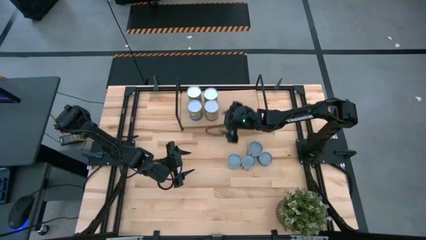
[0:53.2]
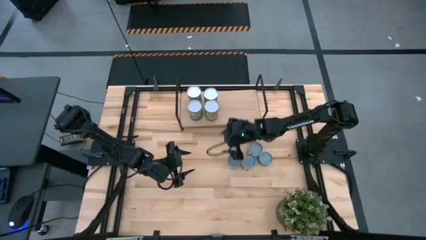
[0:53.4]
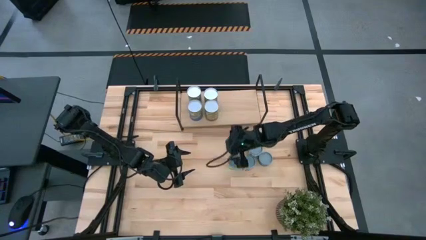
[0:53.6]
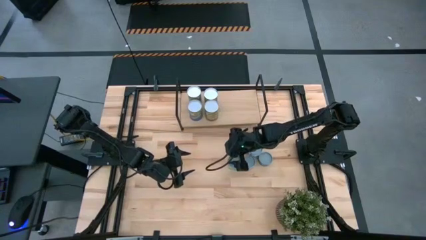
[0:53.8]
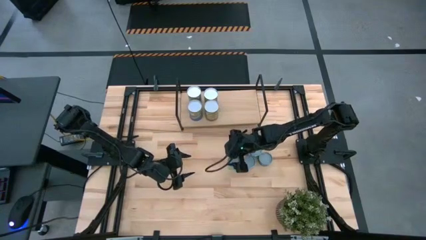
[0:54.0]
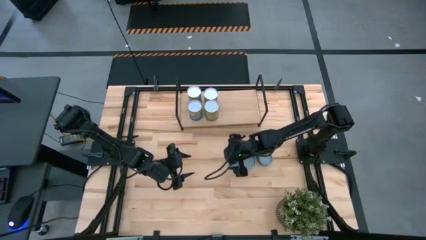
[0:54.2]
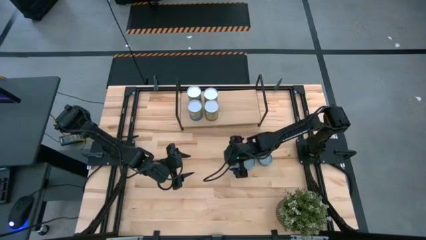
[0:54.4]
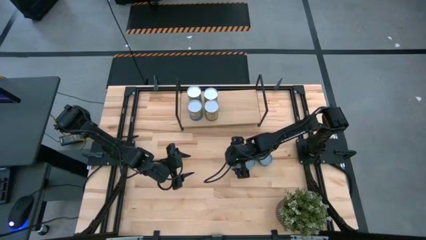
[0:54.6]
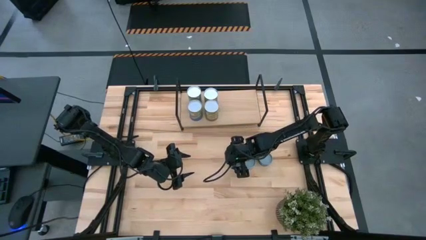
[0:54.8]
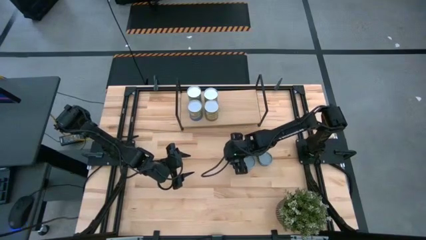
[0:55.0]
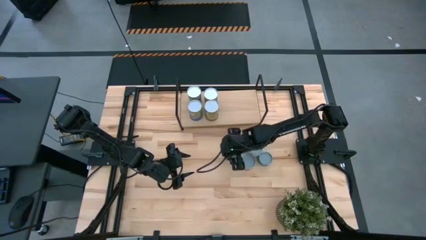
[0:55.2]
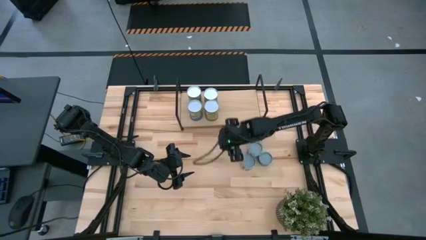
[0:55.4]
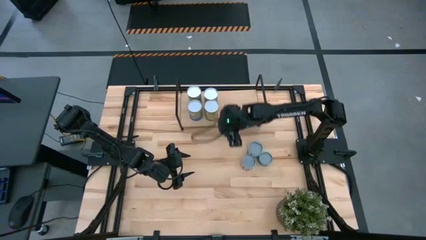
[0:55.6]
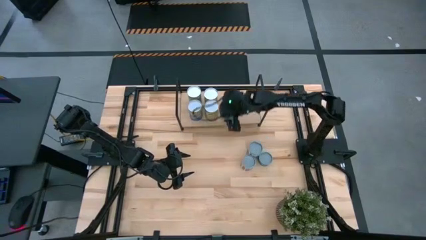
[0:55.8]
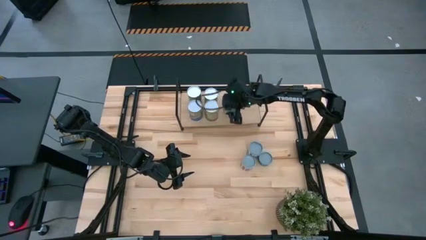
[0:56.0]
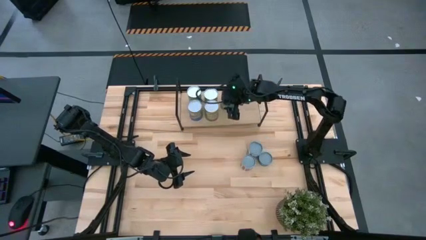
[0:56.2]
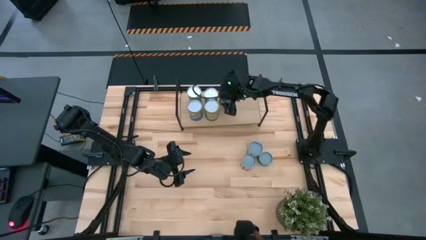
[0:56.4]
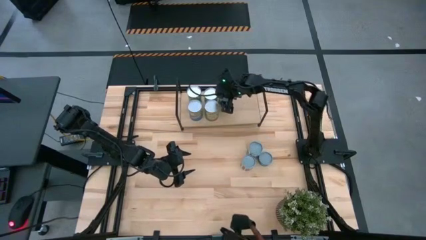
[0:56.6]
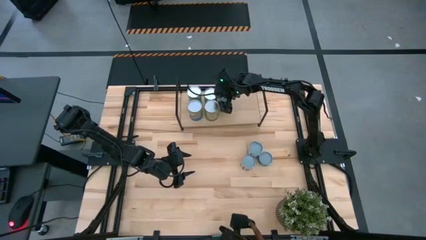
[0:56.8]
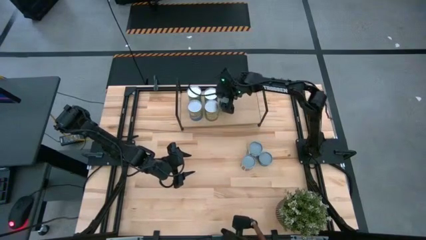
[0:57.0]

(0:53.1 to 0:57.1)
Task: Pick and place cans onto a shelf
Put the canned beans on the shelf

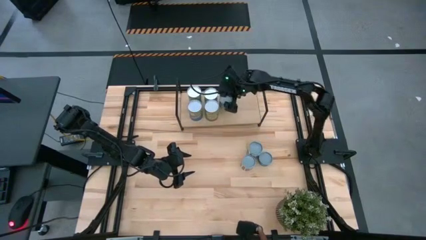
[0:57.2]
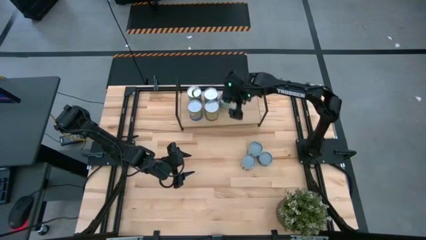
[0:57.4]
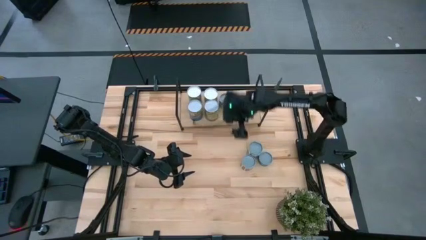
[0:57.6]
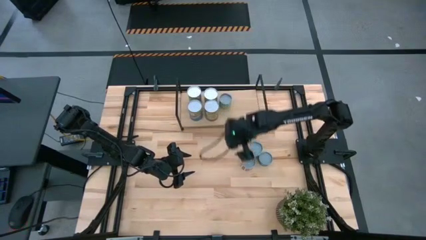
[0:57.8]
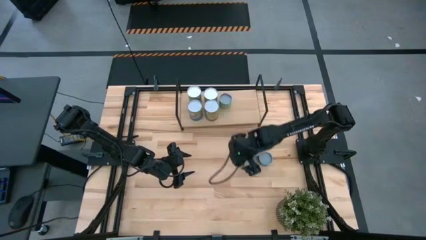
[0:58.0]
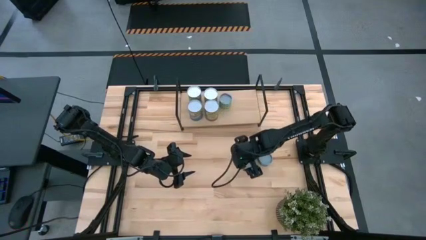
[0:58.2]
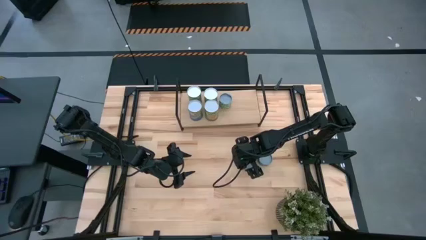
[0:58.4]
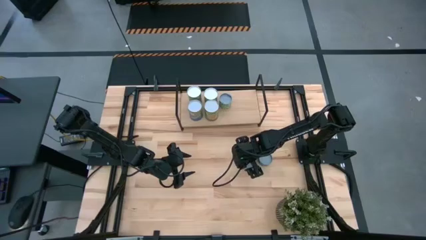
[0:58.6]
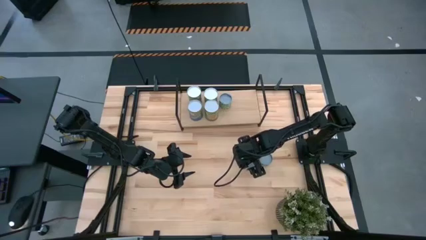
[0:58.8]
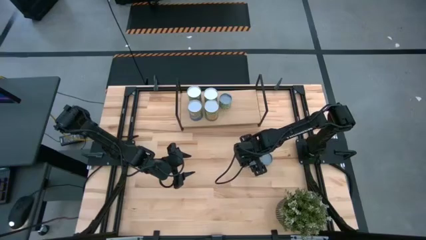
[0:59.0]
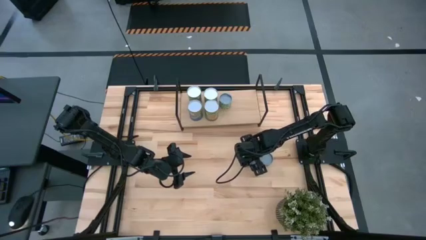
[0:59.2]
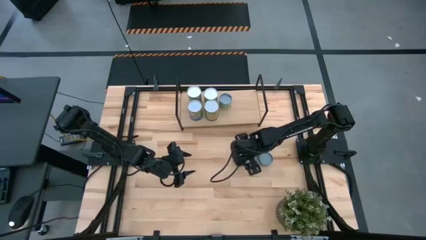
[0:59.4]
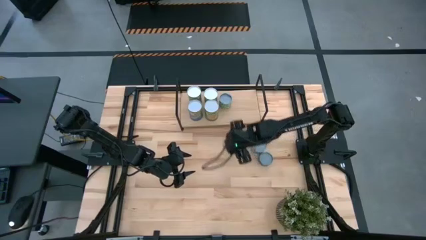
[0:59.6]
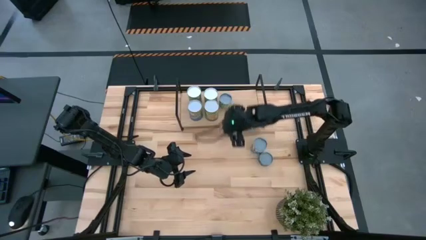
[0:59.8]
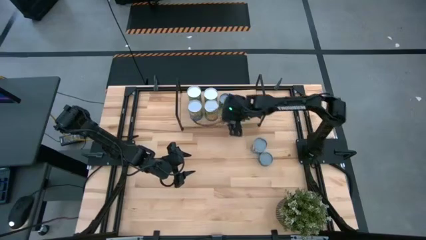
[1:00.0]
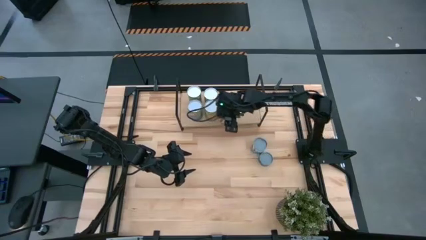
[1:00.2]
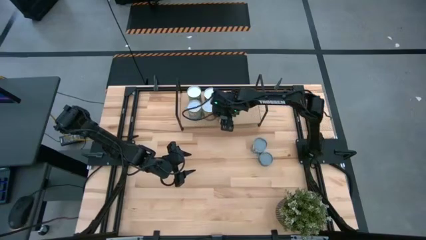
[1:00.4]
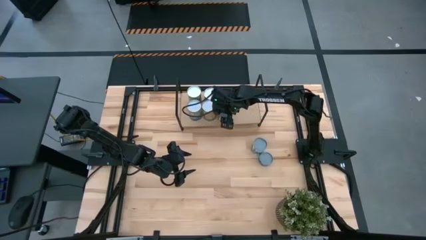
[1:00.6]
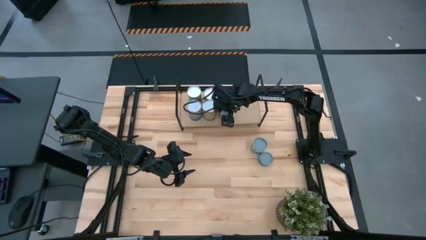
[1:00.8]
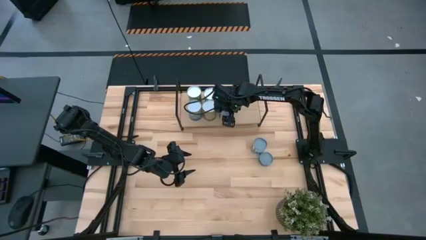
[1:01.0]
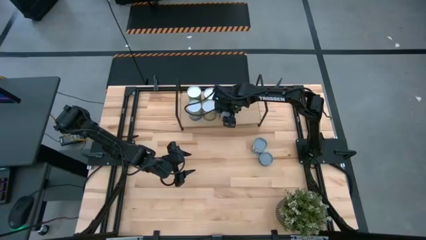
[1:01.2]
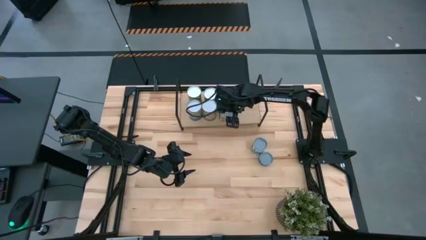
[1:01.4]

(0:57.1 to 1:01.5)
Put the canned tomatoes on the shelf

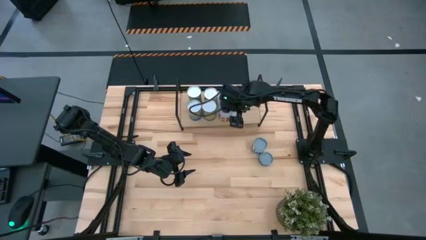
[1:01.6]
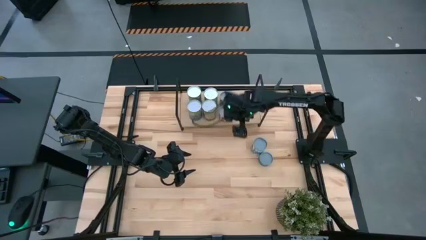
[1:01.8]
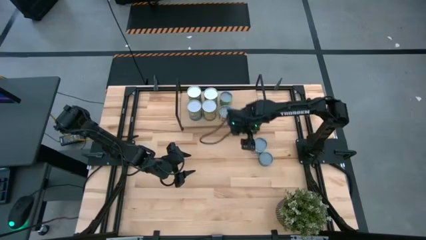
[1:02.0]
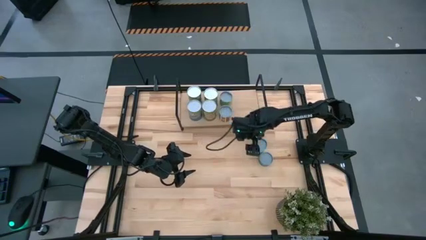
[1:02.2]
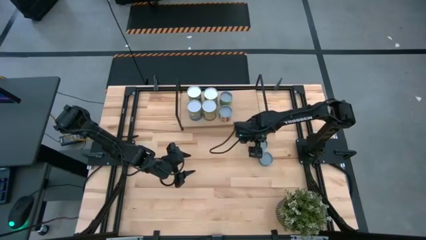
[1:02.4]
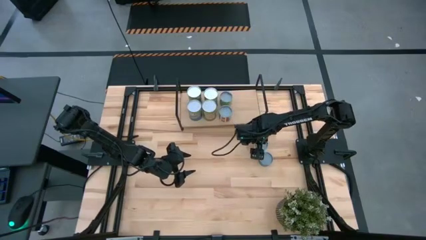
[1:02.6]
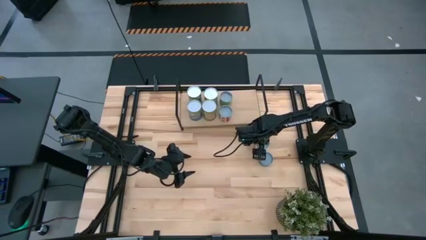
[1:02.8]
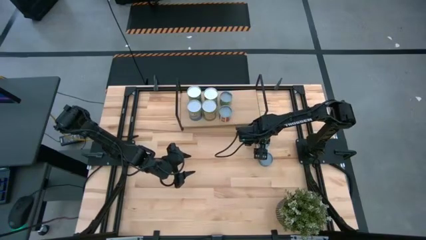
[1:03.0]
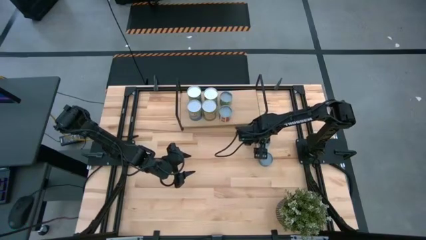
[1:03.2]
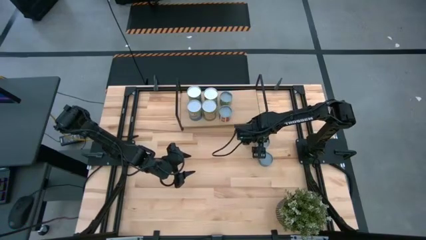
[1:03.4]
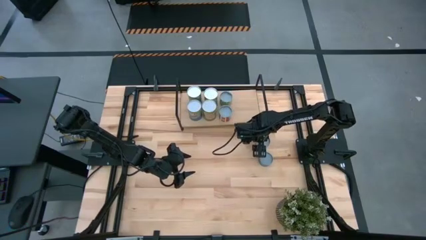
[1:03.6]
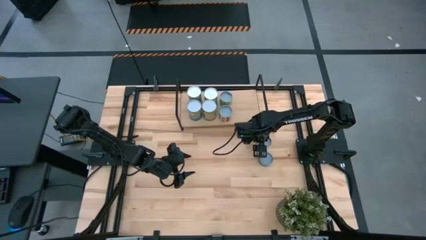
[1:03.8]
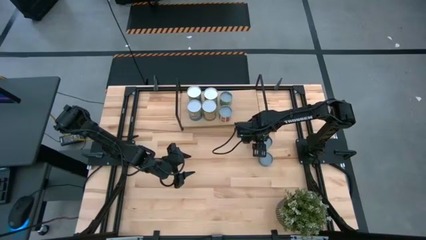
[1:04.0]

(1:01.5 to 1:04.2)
Put the canned mix vegetables on the shelf

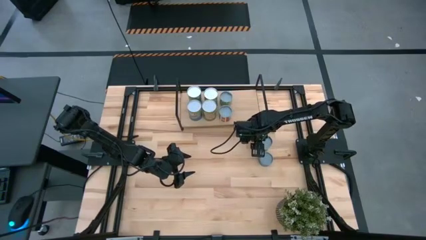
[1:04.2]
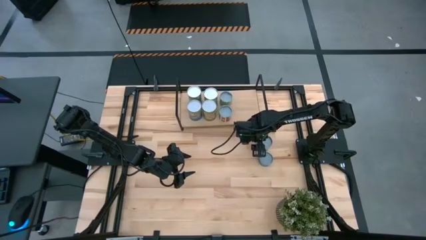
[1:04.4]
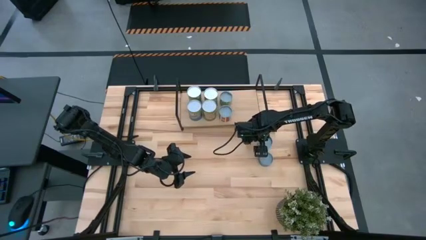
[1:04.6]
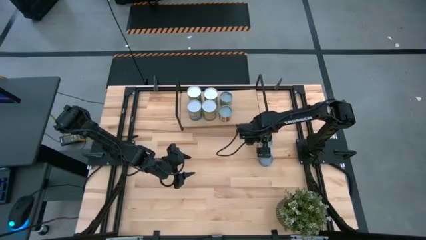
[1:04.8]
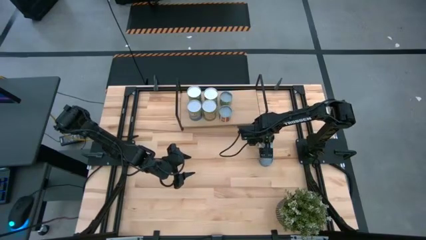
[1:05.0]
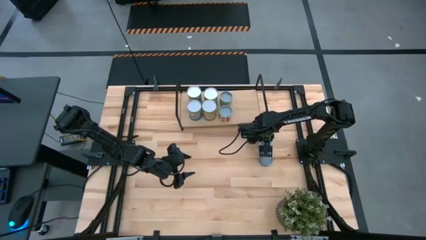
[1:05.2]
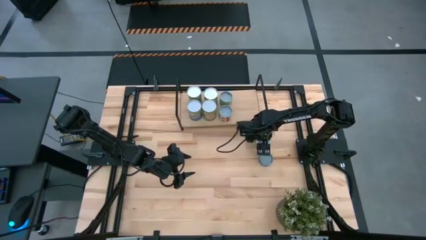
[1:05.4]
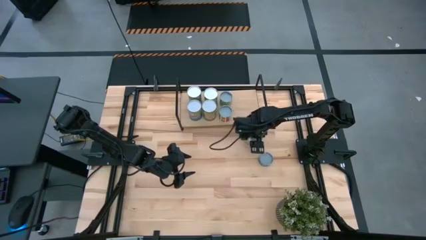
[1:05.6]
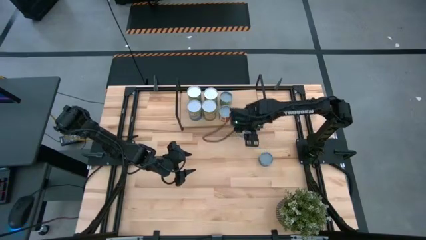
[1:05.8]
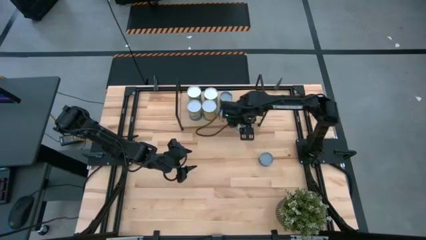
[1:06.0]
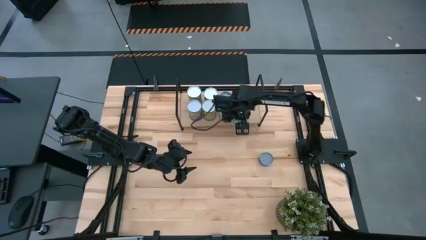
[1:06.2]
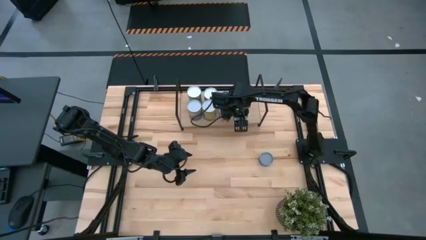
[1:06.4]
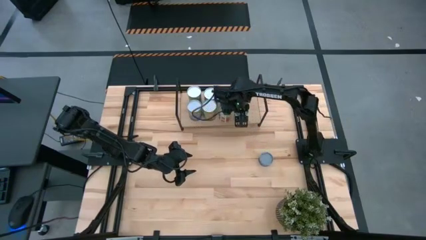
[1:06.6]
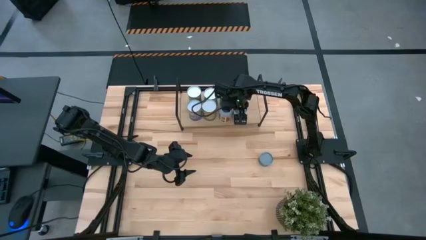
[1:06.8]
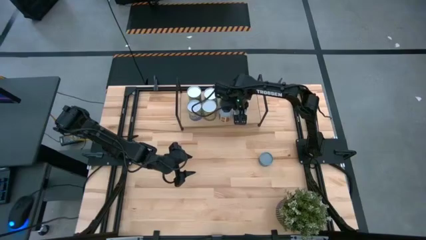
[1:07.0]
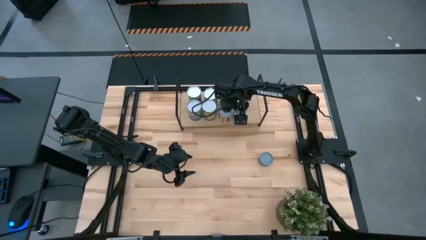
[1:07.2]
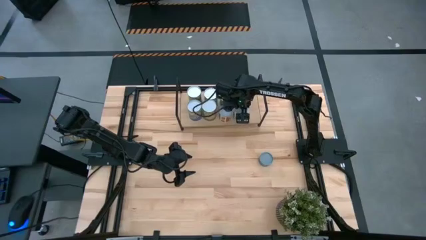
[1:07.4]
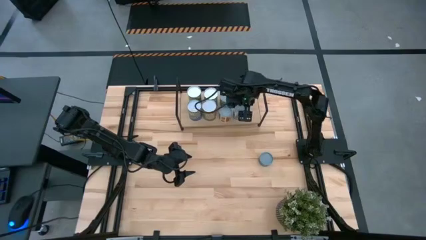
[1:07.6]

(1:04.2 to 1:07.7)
Put the canned mix vegetables on the shelf

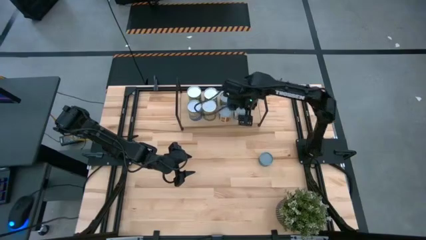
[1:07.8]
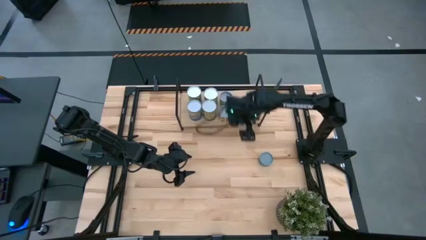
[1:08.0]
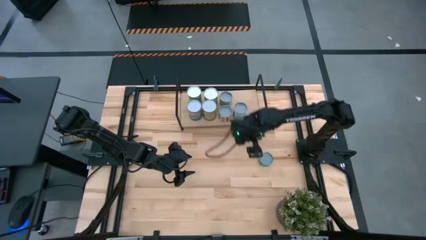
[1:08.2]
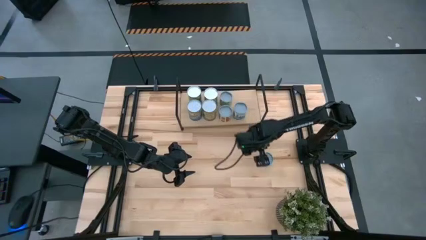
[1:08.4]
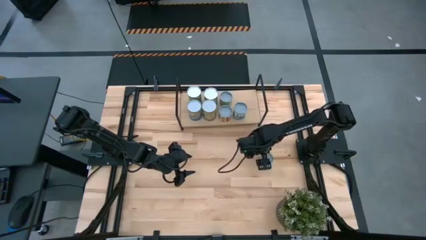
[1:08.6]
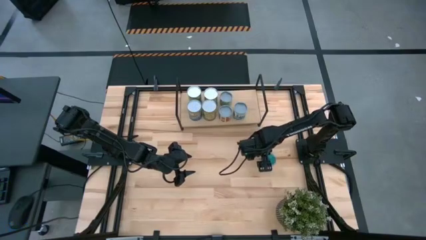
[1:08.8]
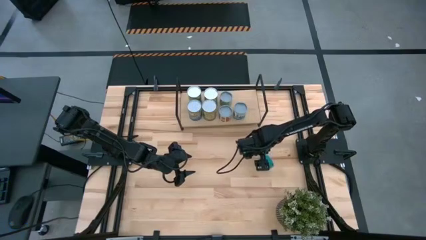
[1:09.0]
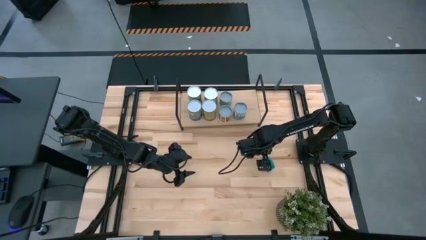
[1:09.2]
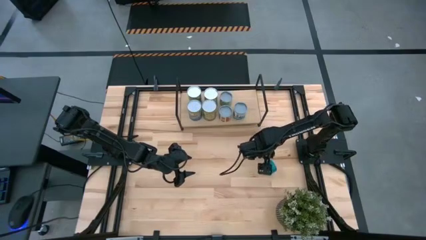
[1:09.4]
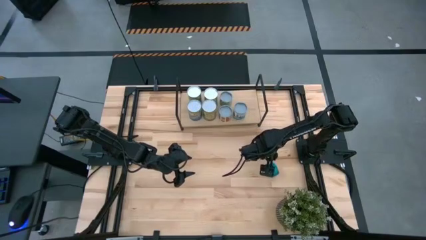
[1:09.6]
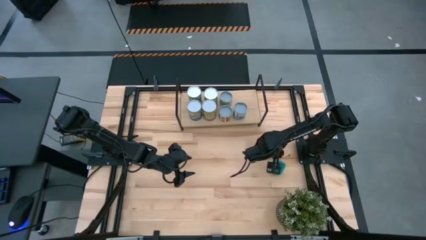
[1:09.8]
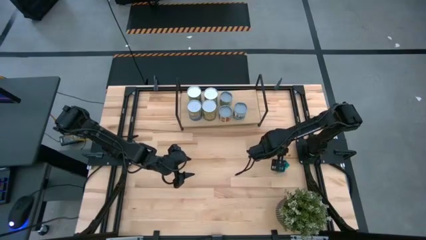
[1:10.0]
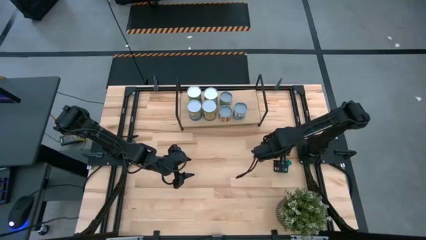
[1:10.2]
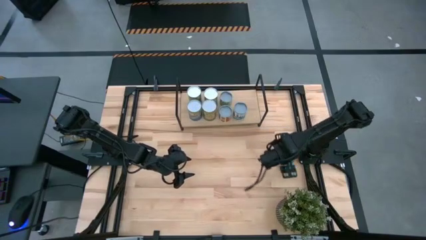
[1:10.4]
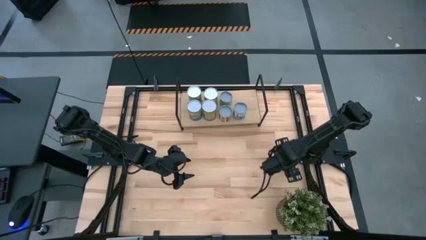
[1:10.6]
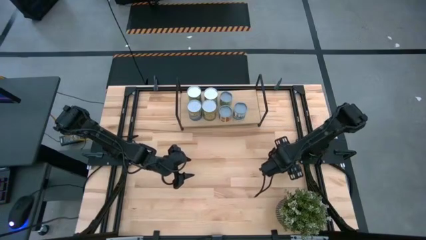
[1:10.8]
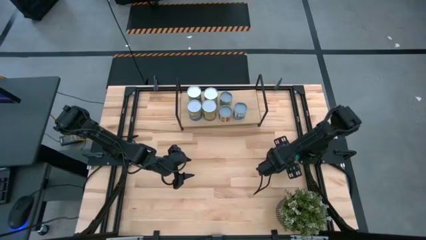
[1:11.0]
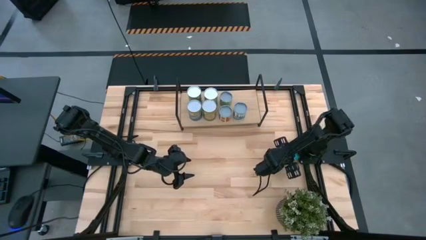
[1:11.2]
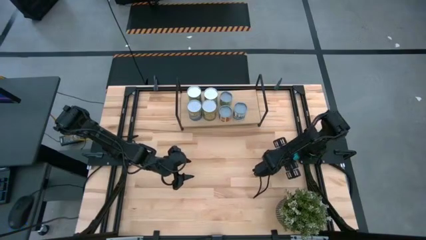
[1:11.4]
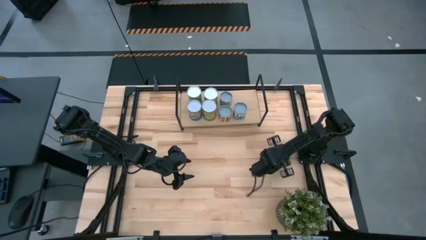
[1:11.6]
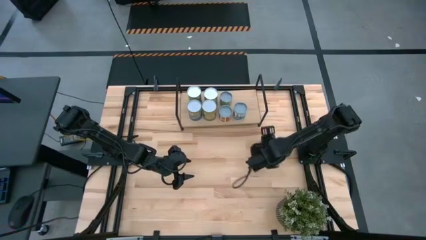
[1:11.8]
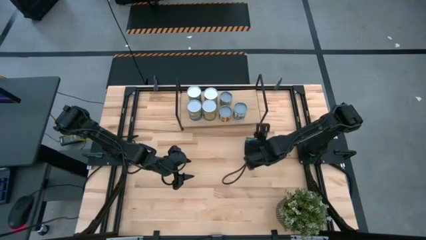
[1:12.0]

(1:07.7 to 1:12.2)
Put the canned green tuna on the shelf
